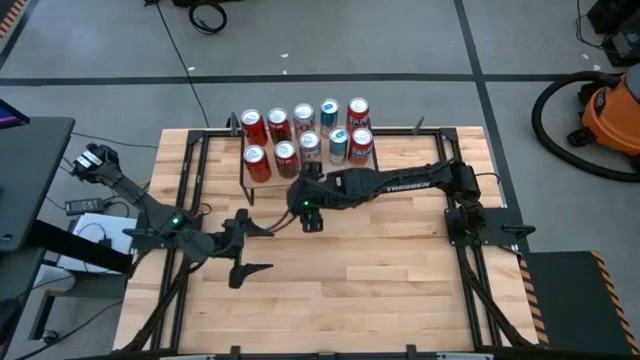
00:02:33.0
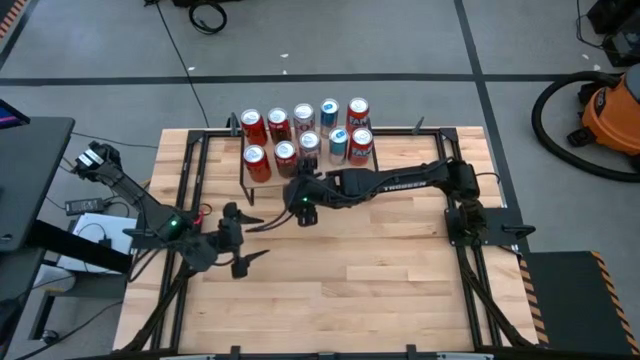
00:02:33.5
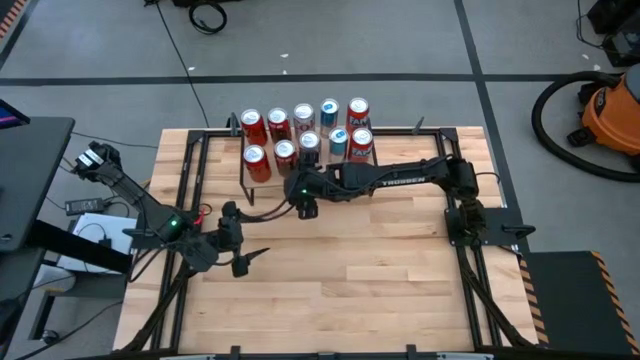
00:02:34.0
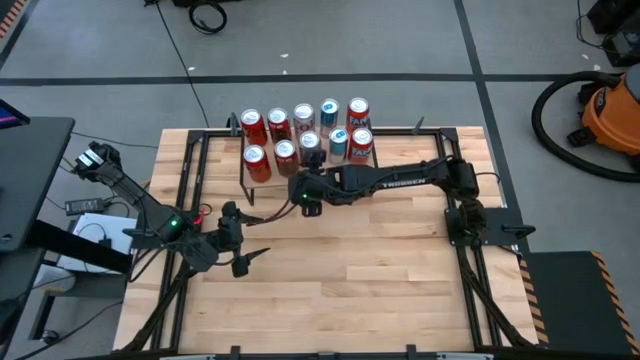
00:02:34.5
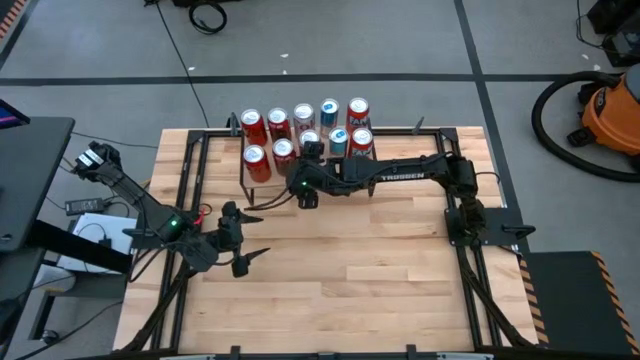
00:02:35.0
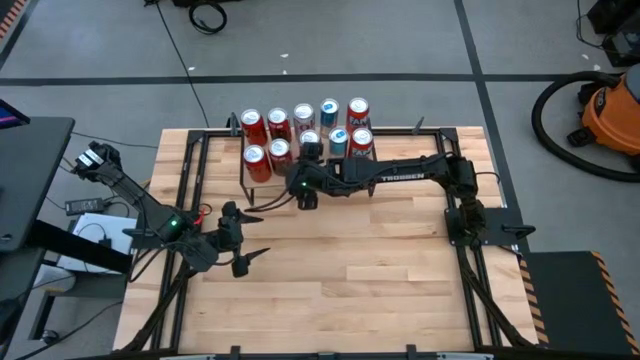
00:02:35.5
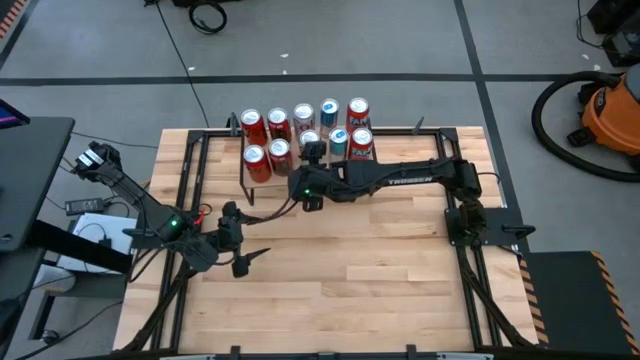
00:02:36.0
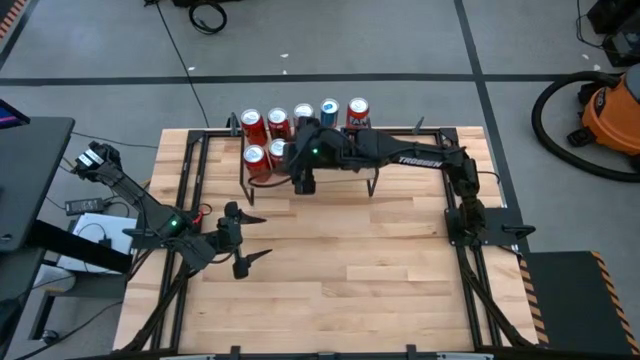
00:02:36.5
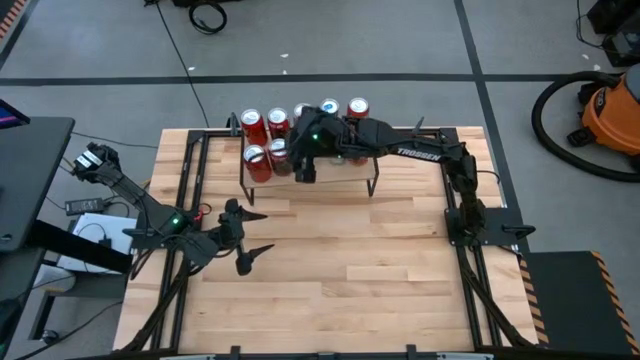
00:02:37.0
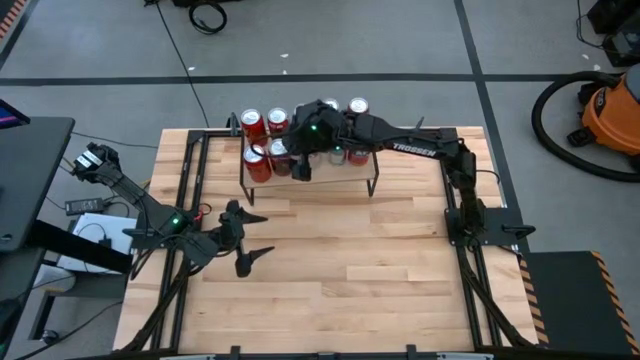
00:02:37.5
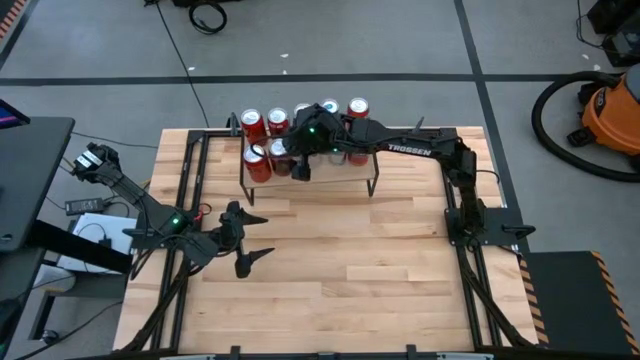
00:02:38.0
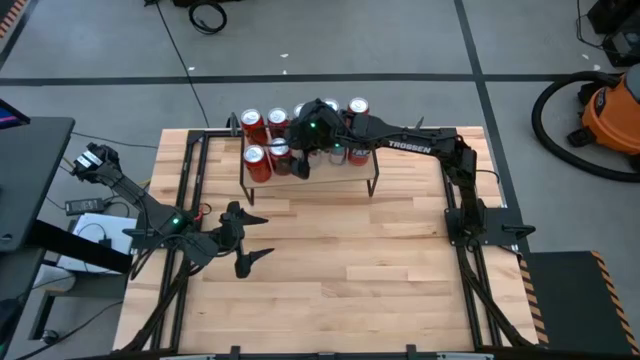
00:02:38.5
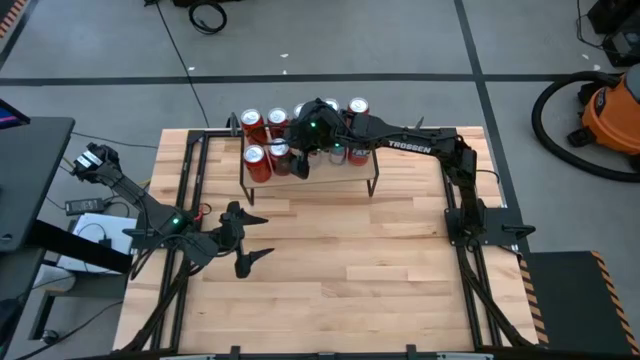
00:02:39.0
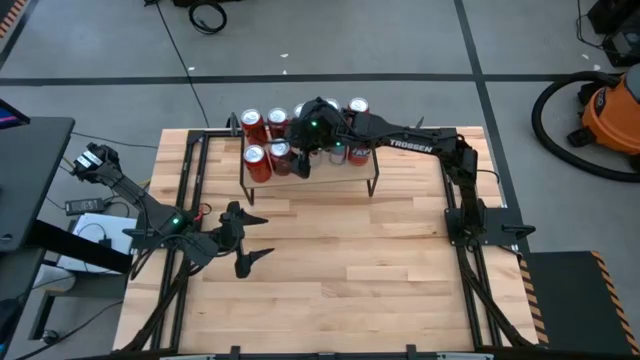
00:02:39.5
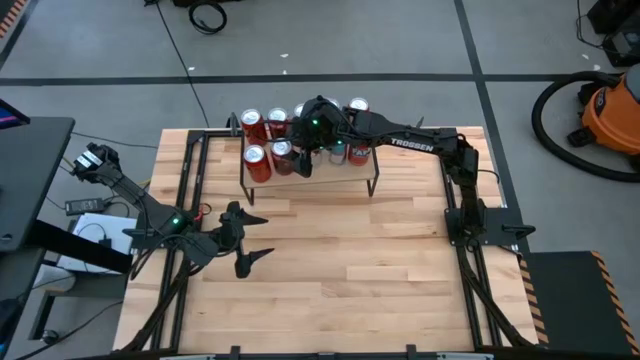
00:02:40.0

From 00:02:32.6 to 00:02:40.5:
Task: Place canned beverage on shelf
Adjust the white soda can on the shelf

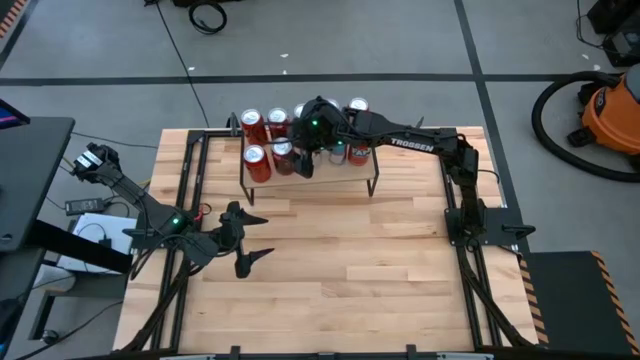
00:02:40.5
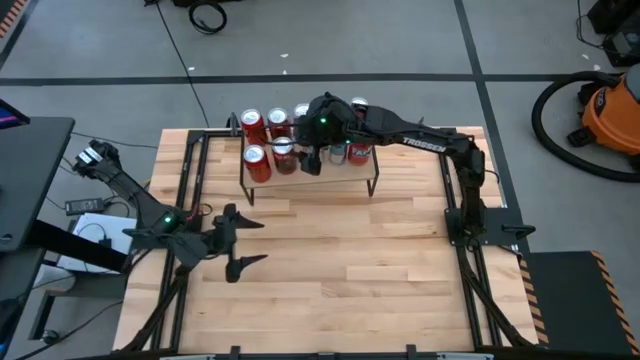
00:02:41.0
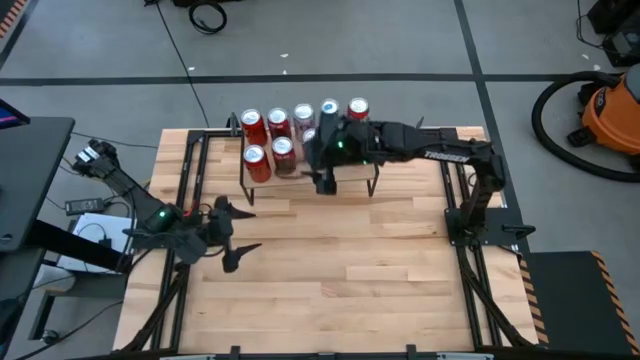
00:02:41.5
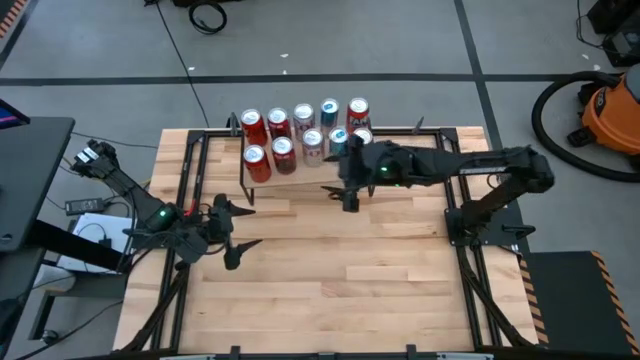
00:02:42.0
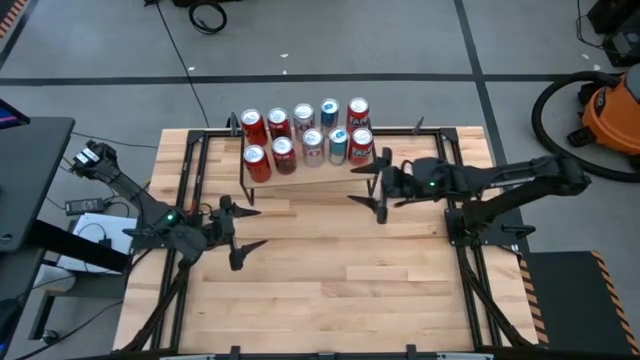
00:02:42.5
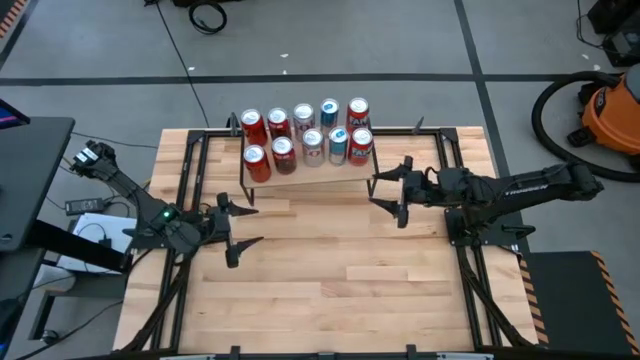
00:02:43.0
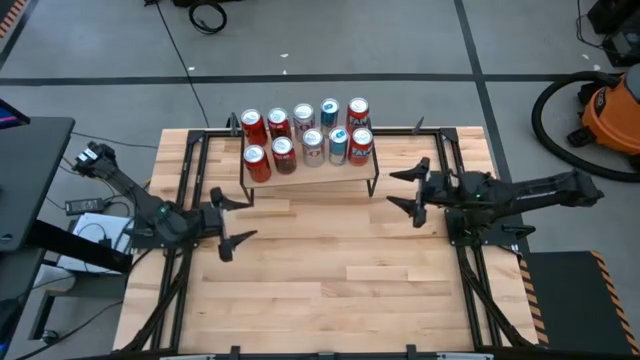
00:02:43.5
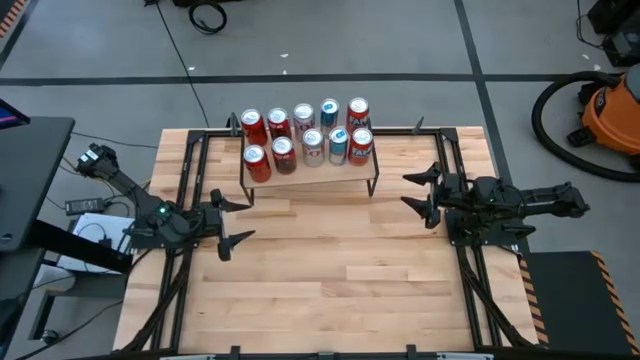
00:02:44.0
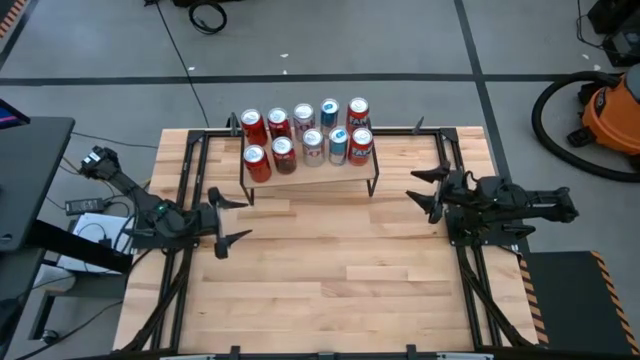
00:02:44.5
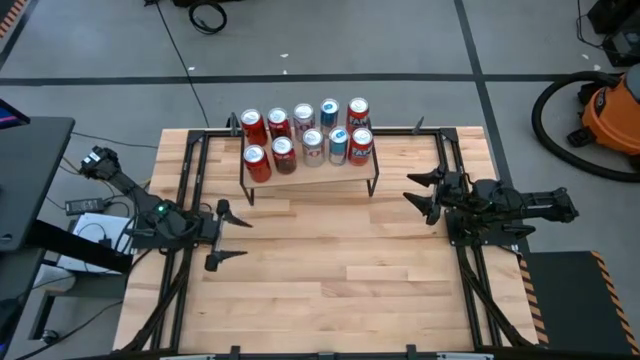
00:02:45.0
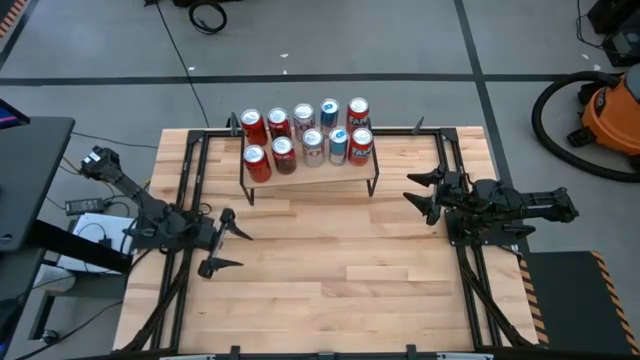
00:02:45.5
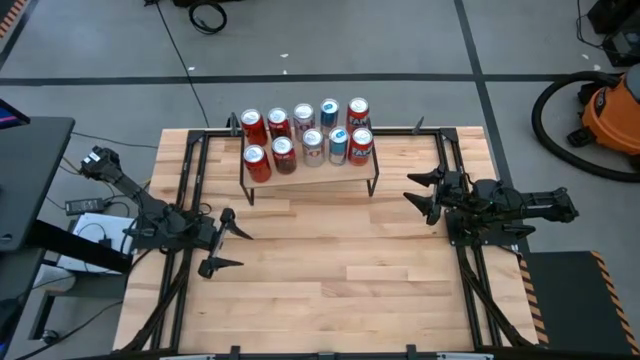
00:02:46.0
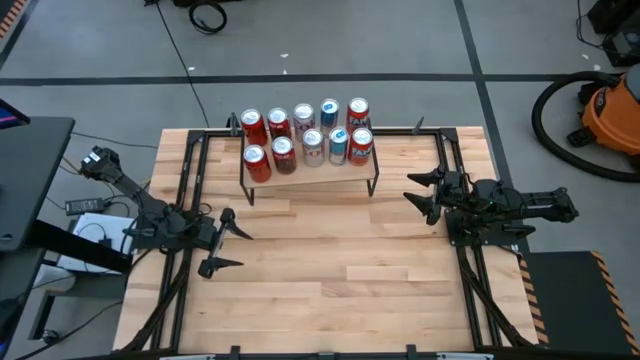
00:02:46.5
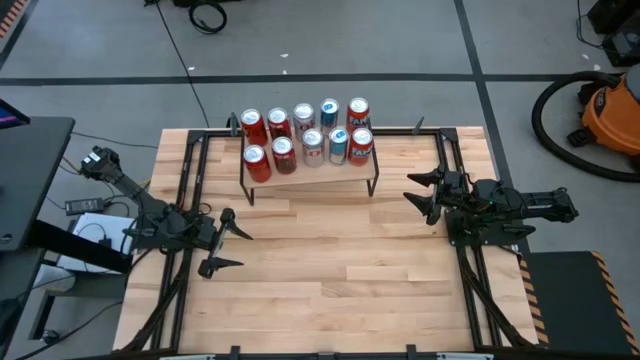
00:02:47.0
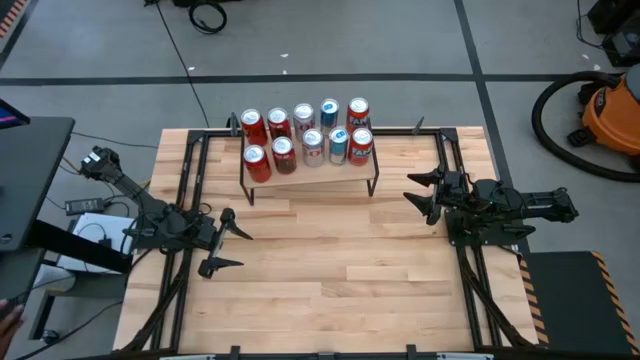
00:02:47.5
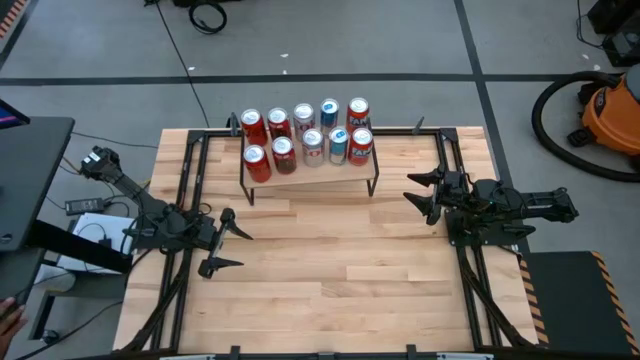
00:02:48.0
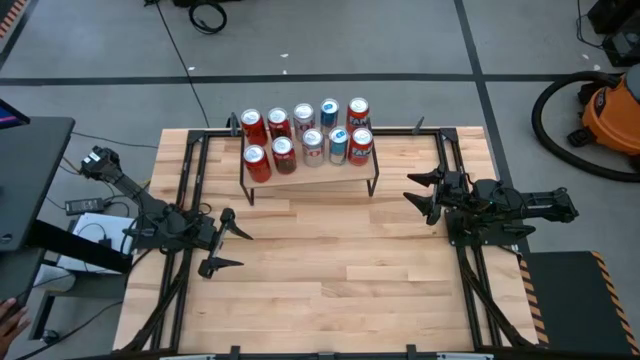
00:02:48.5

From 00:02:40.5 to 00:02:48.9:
Return to Home Position

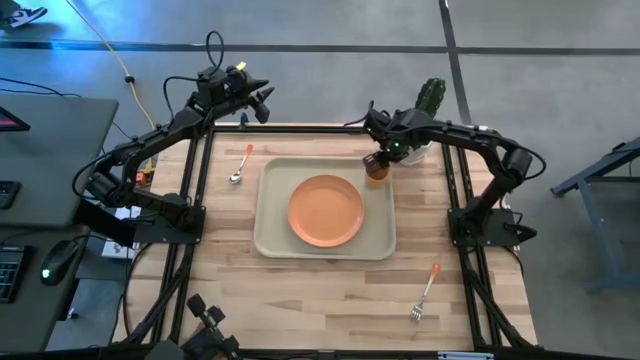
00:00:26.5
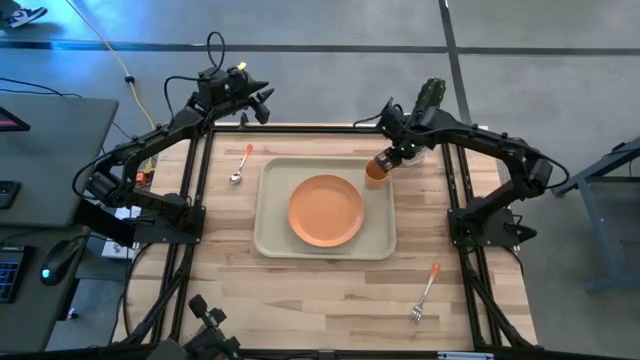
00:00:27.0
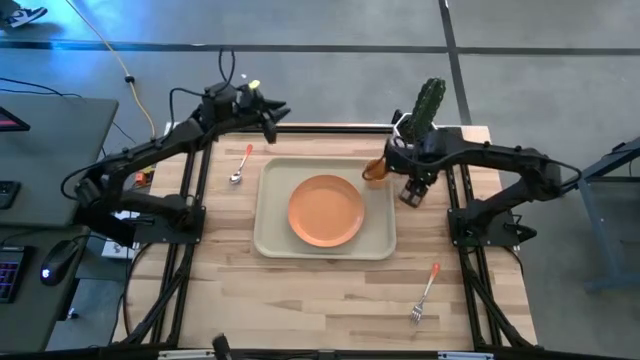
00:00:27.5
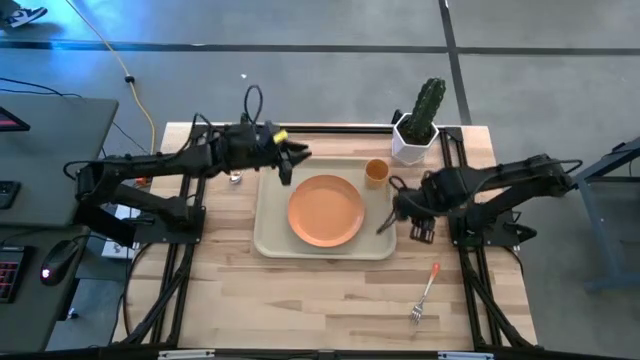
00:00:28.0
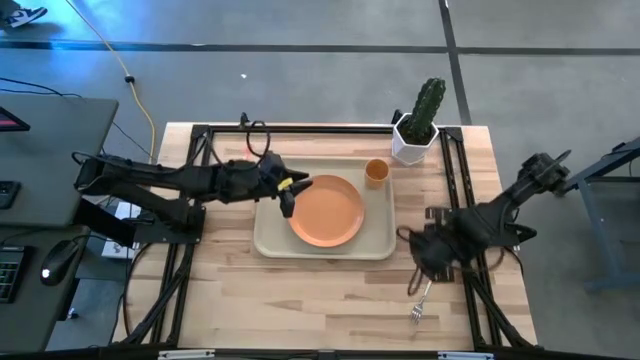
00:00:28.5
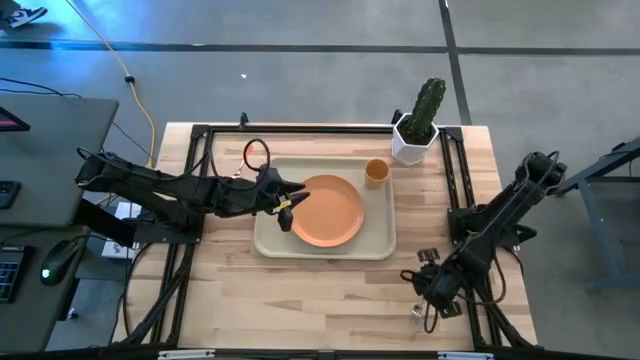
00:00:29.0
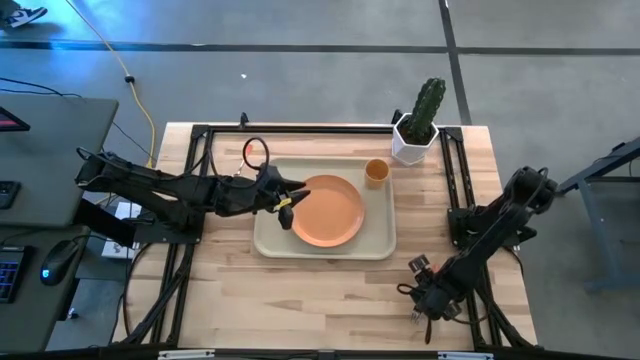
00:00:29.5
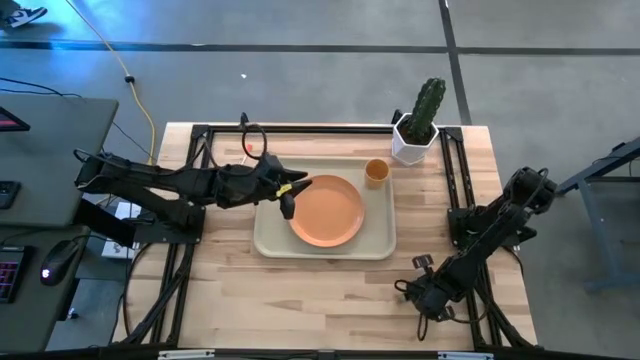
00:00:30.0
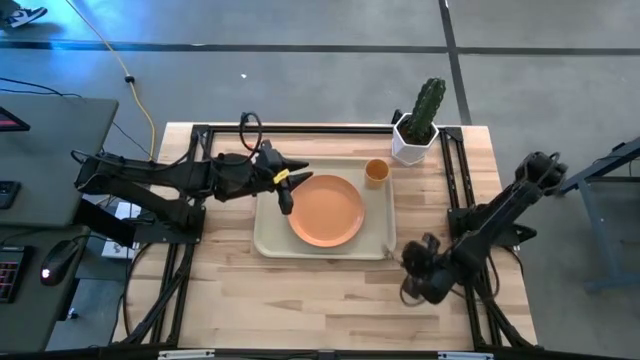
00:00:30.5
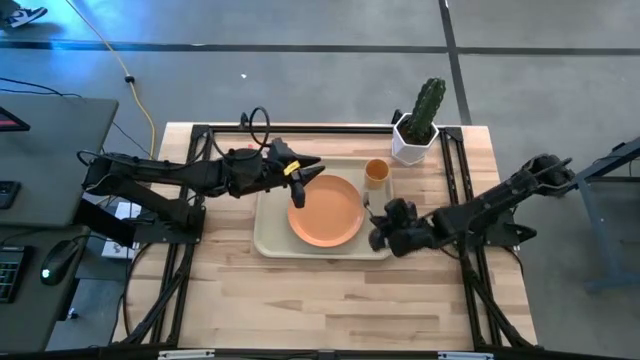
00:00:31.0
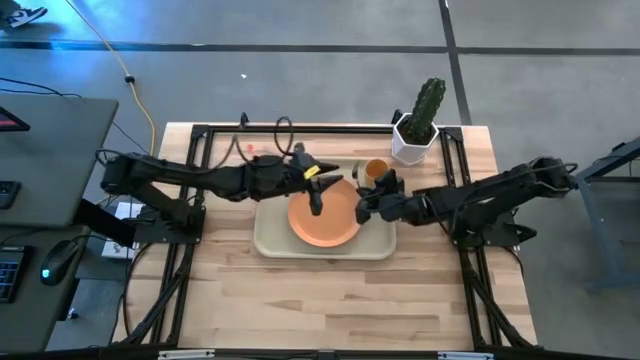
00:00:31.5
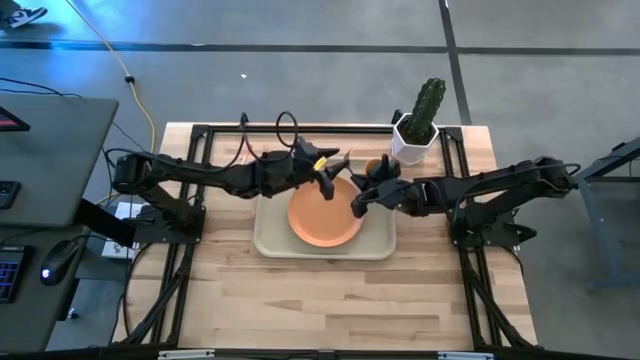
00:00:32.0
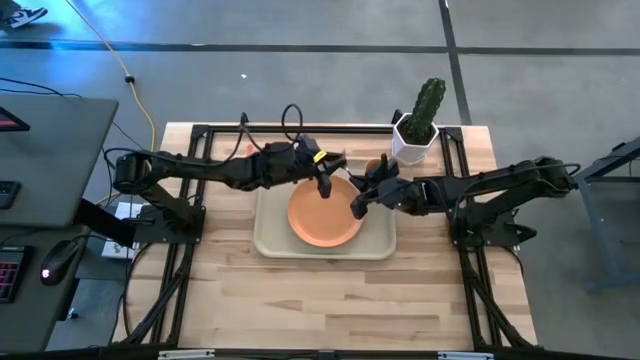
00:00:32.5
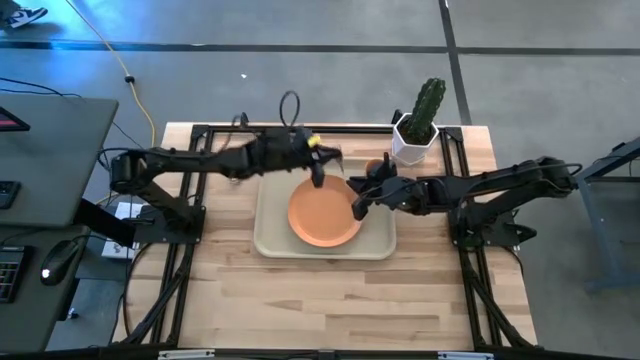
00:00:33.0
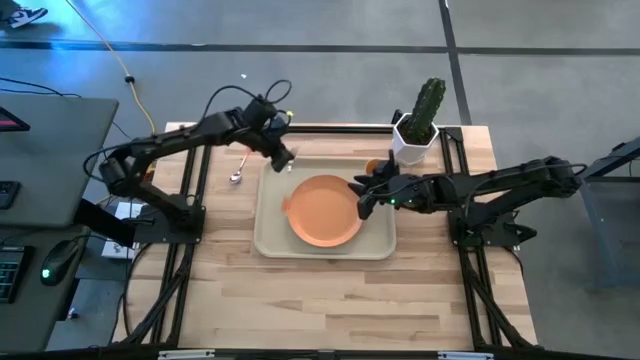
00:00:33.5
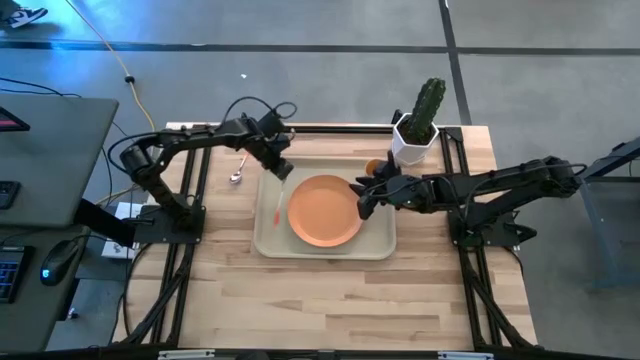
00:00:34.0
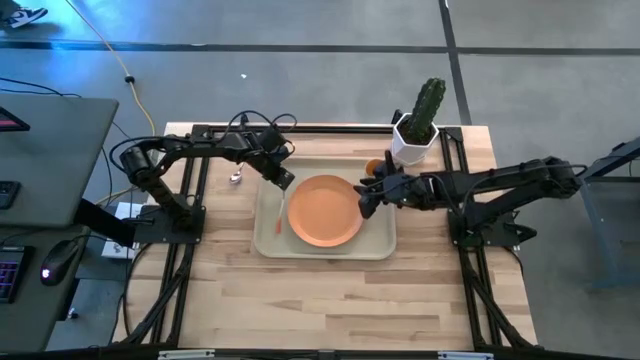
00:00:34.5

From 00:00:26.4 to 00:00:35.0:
Task: Pick and place plate/cup/fork/spoon on tray
Put the orange fork on the brown tray on the left side of the orange plate
